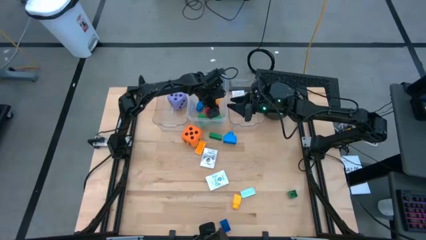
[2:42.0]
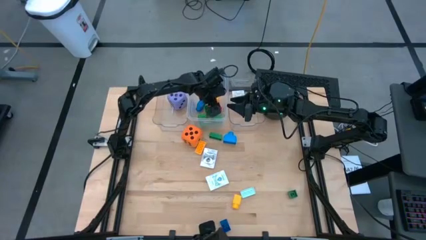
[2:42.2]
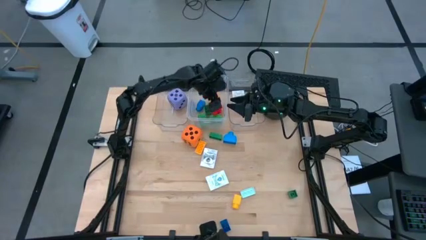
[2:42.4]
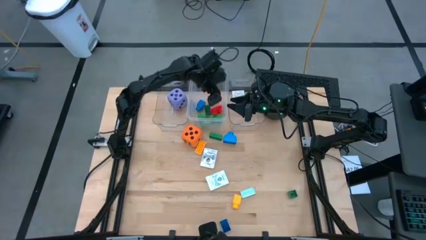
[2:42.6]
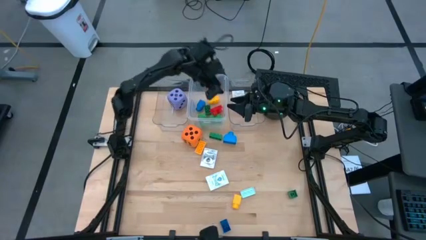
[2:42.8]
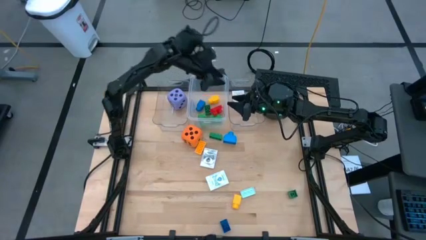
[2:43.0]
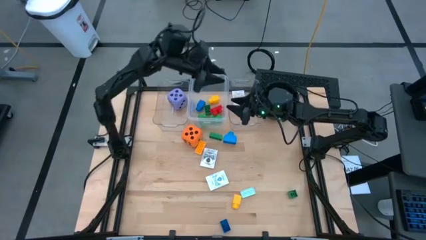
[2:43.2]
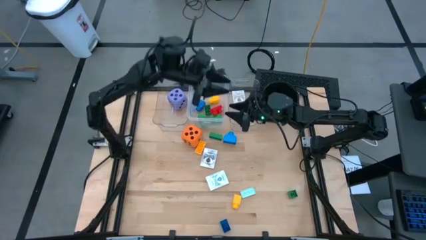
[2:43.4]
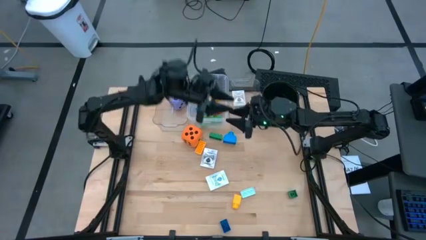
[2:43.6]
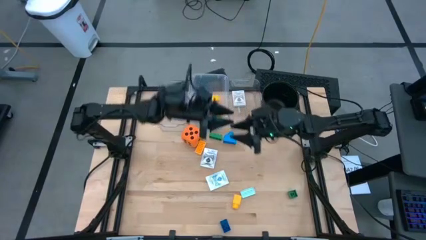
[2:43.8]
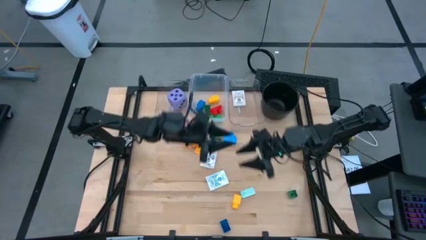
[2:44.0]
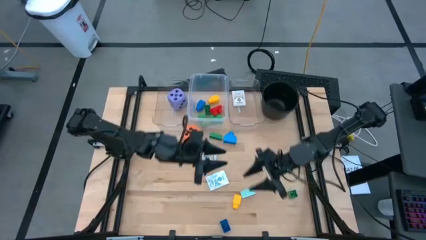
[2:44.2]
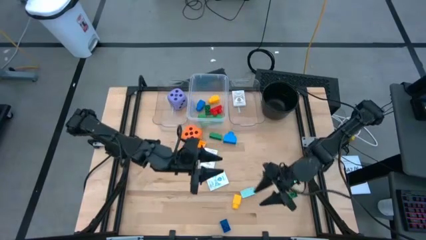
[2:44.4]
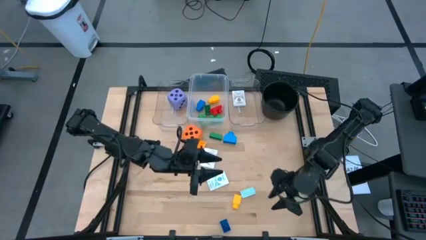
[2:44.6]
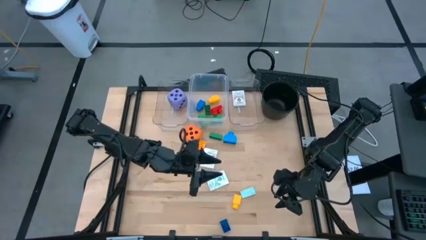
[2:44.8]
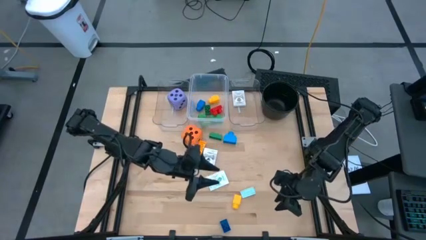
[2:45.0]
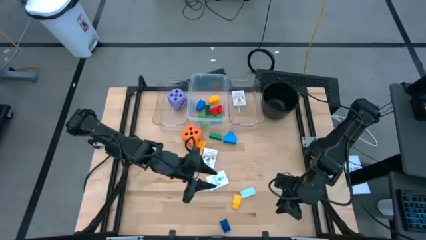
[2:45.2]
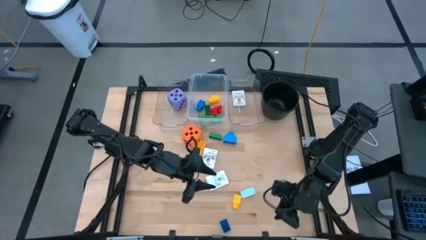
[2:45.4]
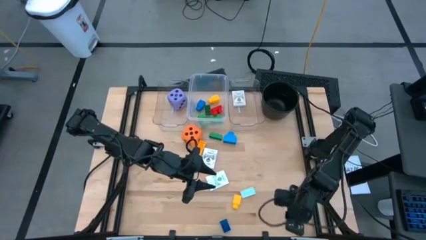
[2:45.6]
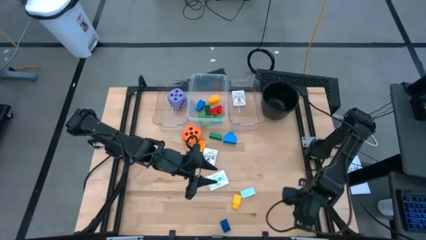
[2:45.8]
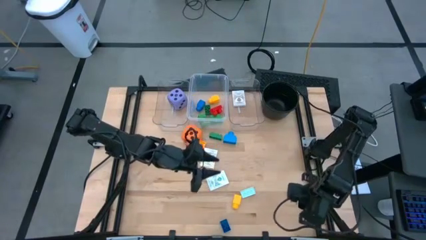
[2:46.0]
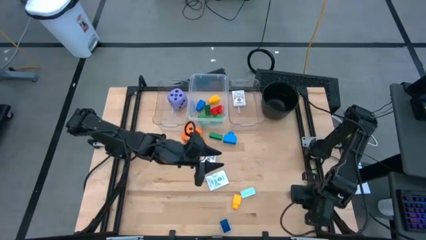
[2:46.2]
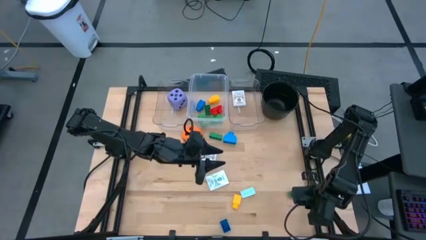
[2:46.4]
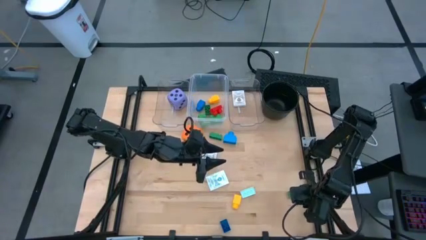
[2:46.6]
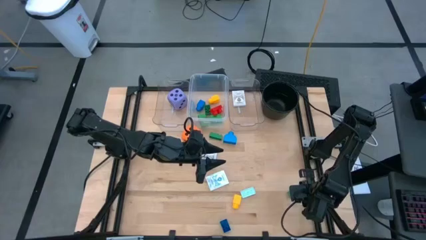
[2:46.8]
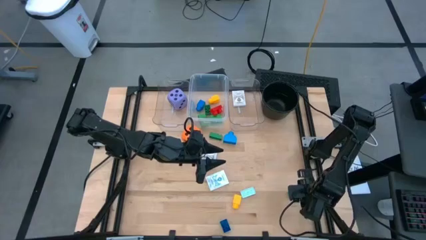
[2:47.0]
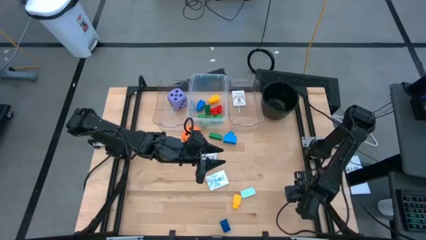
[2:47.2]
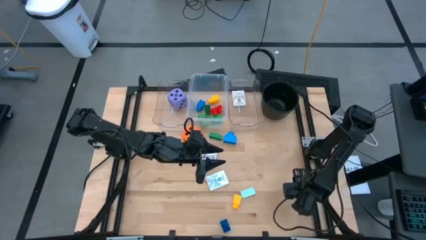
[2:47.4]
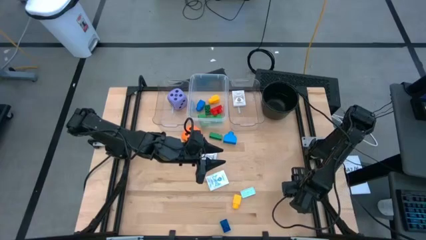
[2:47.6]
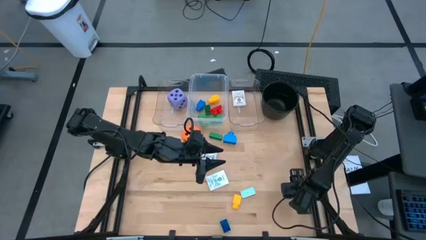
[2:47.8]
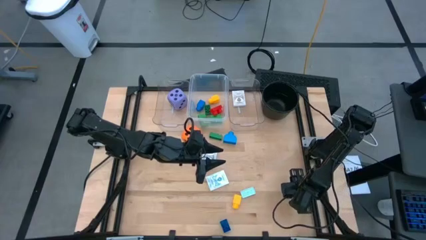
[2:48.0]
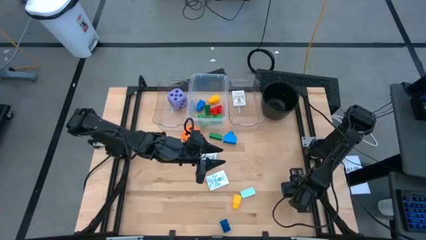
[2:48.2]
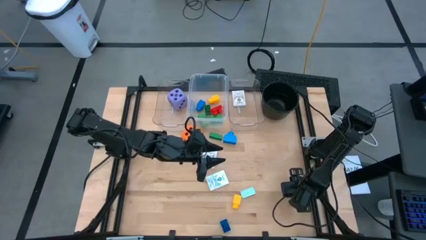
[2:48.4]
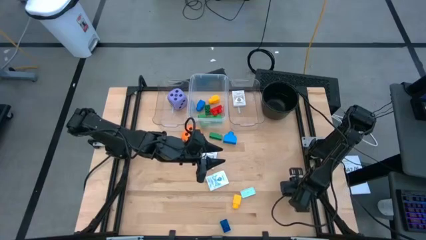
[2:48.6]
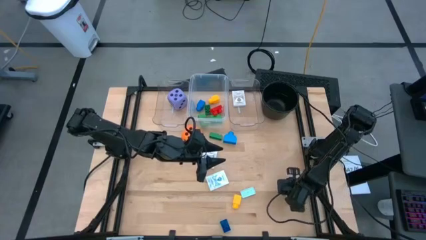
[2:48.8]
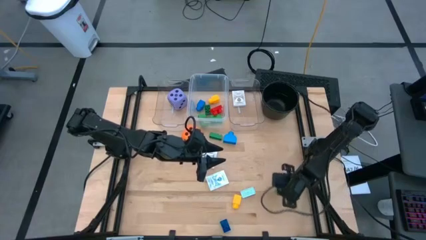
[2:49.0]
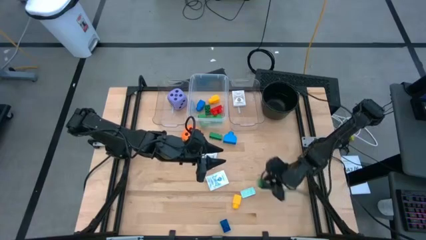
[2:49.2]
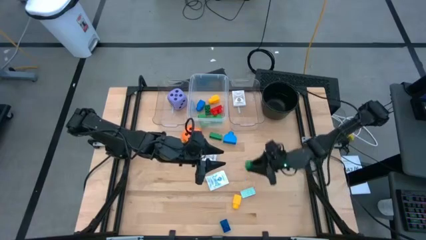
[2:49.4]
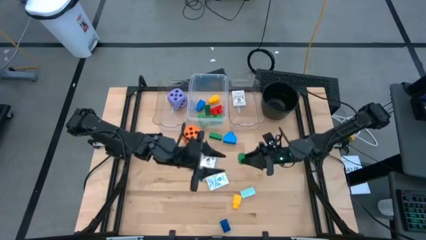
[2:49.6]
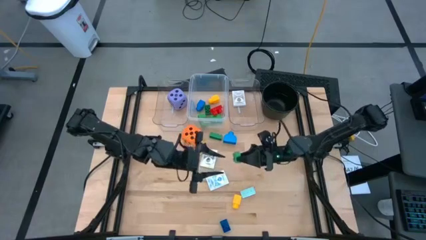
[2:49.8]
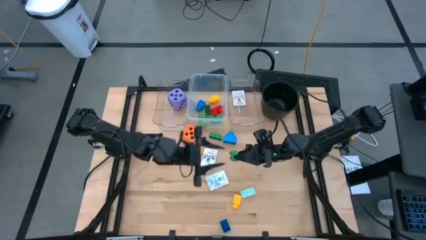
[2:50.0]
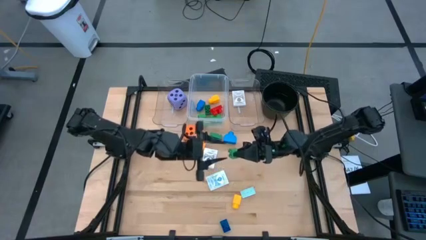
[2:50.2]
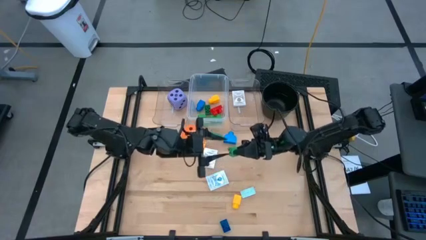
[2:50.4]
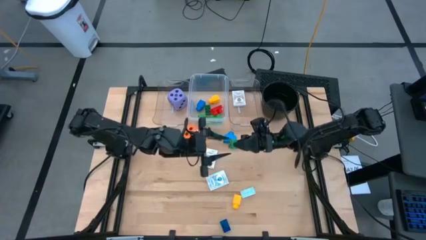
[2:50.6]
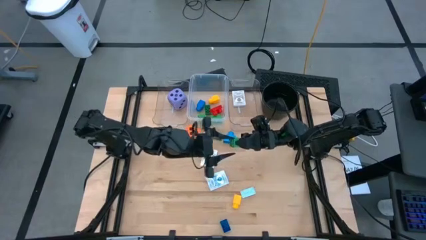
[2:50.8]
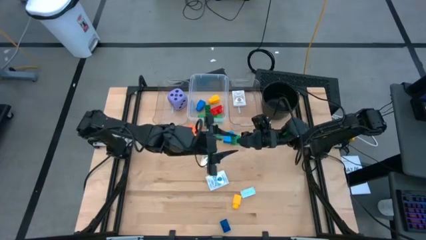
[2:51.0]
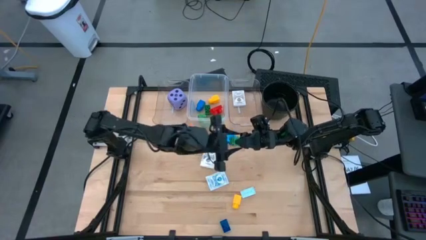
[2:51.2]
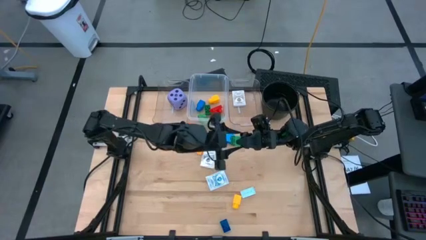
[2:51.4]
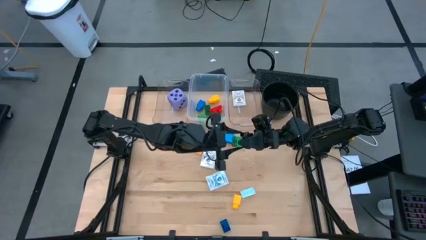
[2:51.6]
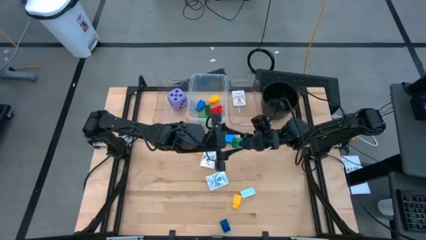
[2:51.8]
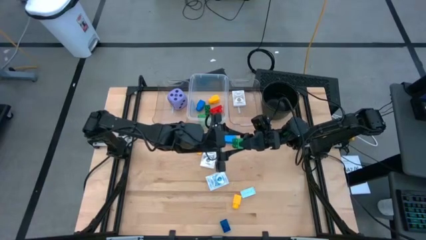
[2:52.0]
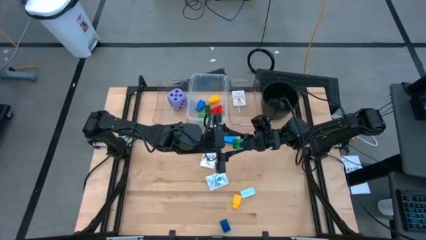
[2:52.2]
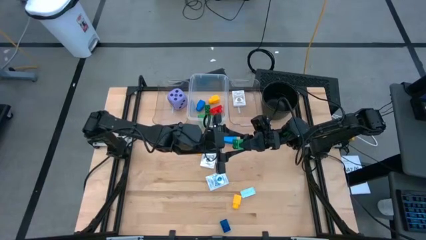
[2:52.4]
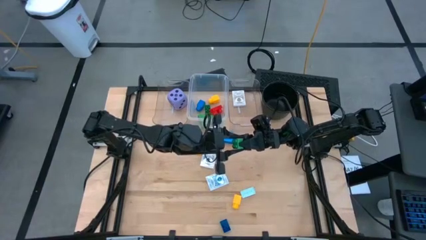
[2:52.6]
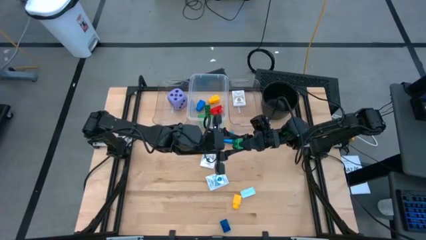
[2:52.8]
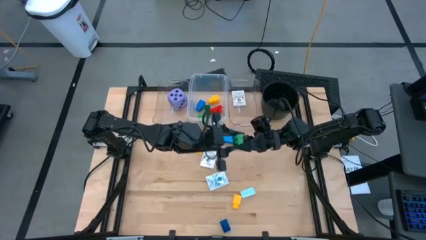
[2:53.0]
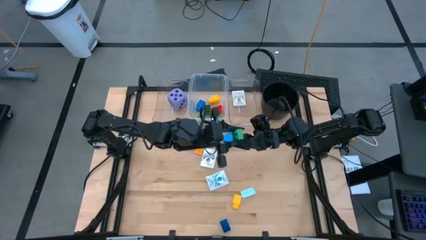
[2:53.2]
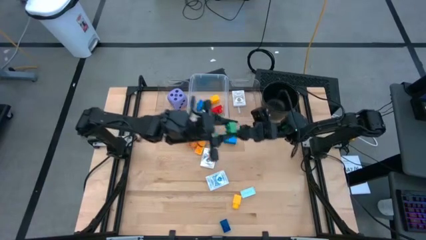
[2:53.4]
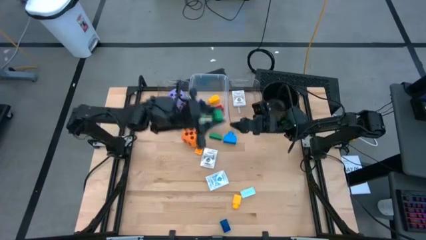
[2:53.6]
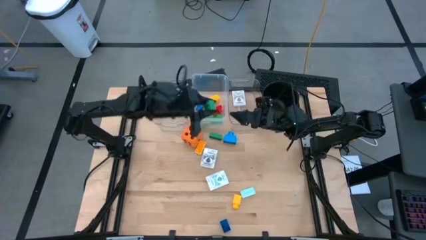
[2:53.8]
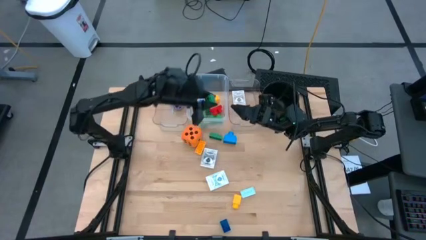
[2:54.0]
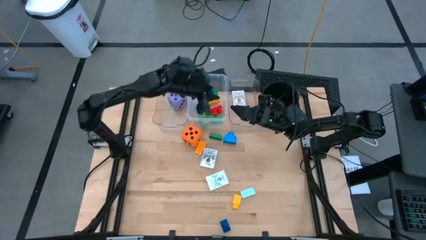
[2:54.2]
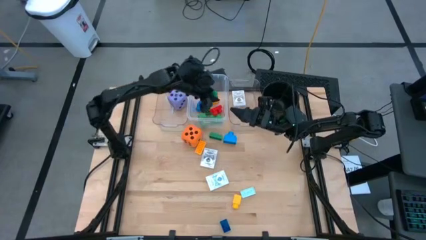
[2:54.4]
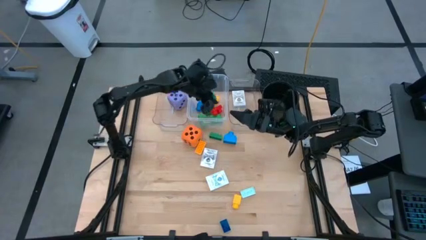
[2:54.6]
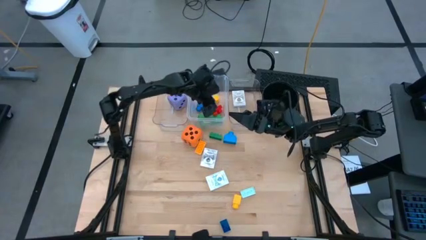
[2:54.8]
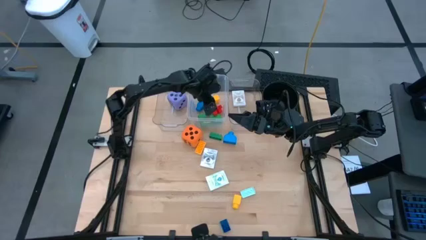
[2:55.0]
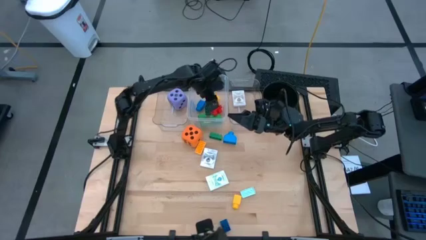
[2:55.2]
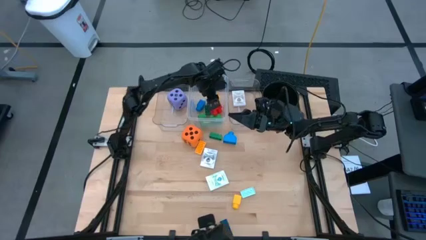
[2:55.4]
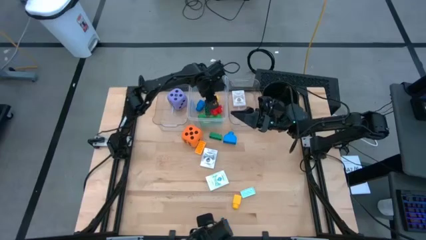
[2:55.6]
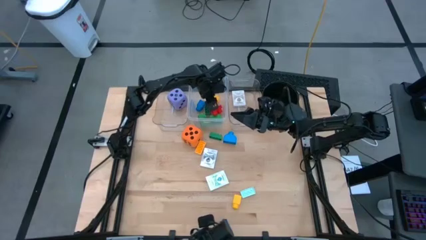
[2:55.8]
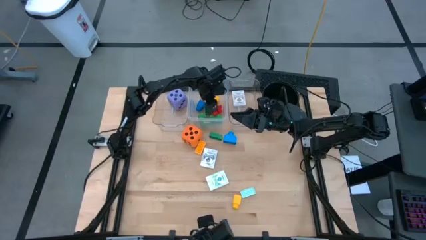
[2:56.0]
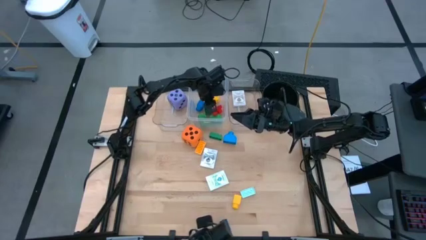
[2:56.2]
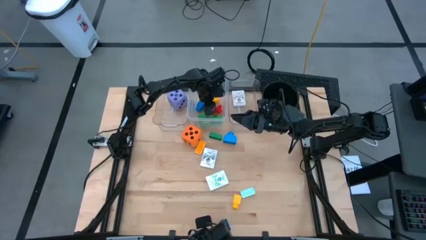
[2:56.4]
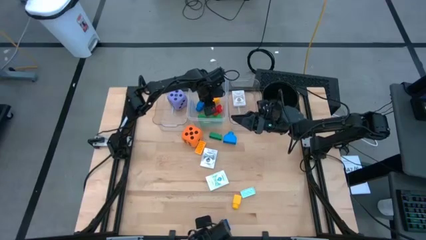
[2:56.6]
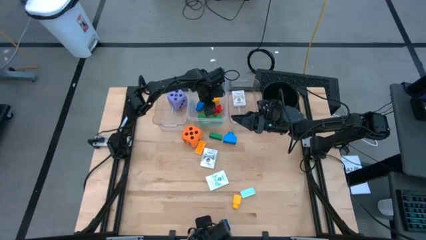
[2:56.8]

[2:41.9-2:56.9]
Task: Pick & Place Toys
Put the green four stud game piece into the middle transparent bin

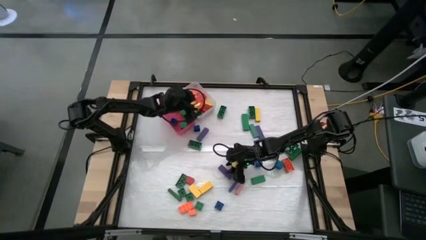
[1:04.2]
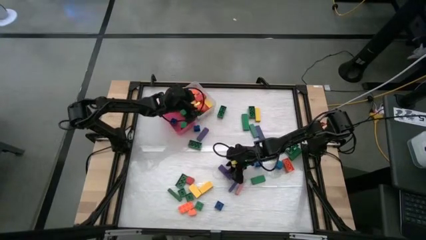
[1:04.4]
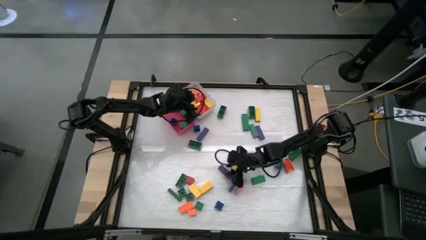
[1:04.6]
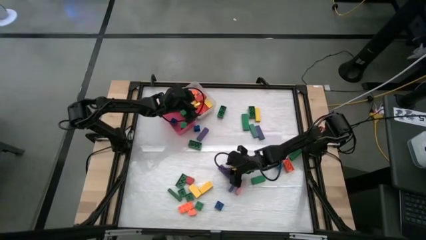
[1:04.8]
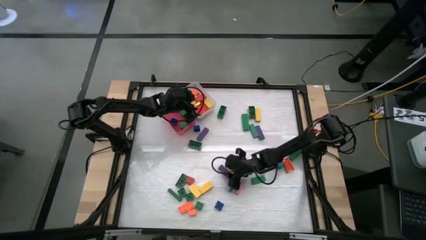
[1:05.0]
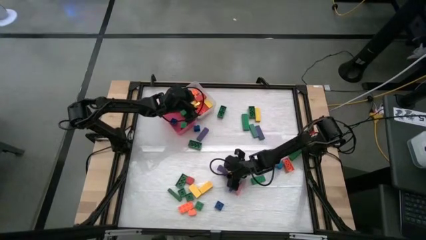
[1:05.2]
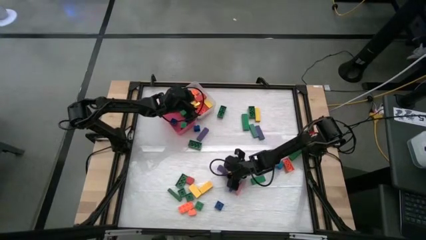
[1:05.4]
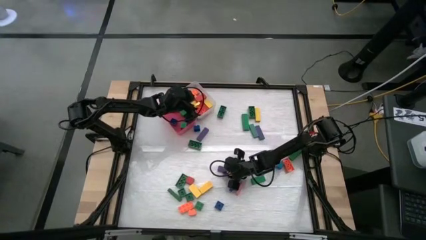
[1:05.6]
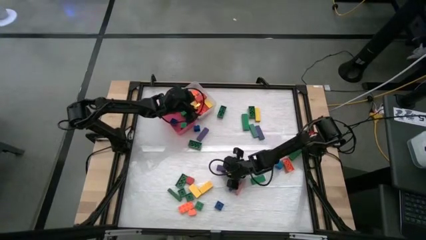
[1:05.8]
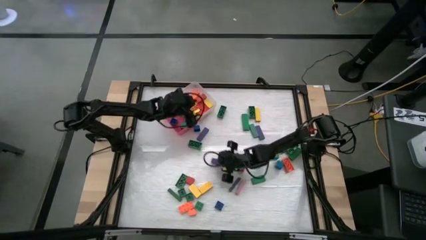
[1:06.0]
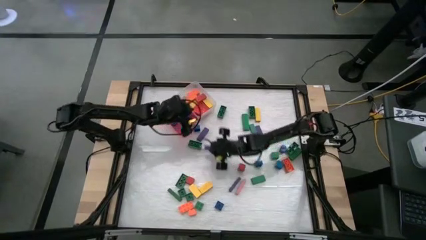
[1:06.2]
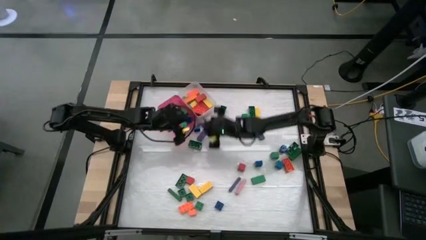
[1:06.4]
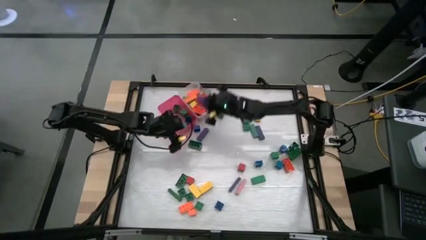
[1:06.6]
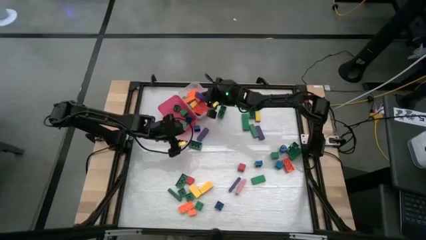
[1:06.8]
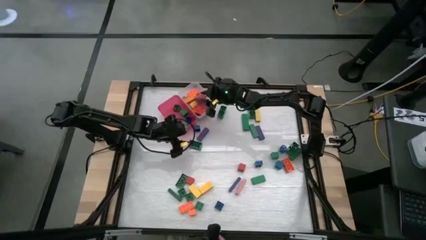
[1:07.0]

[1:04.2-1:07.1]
Task: Sort blocks by size
Put the big purple block into the white bin
